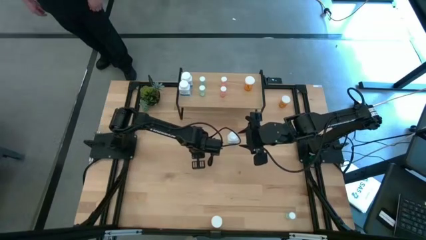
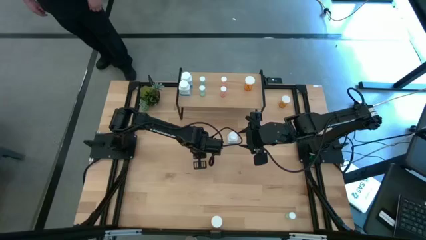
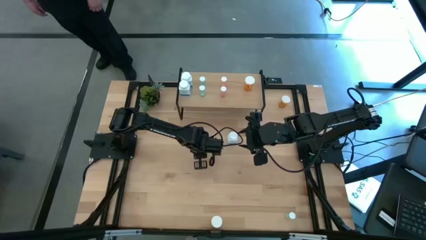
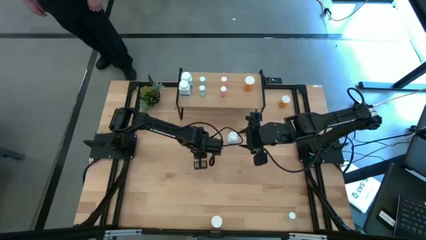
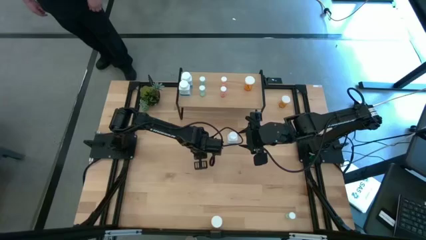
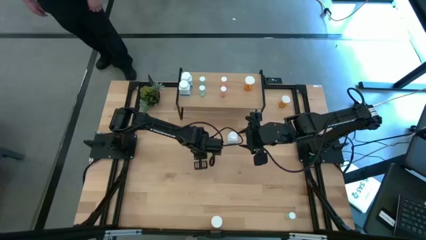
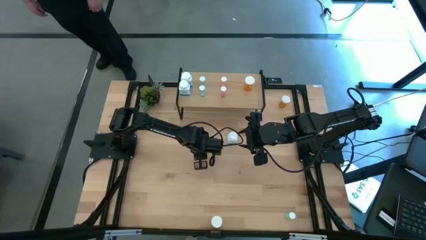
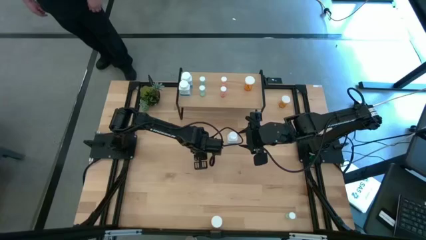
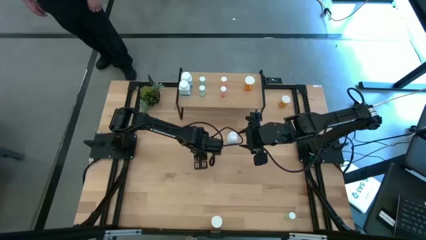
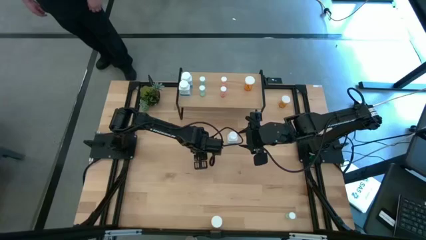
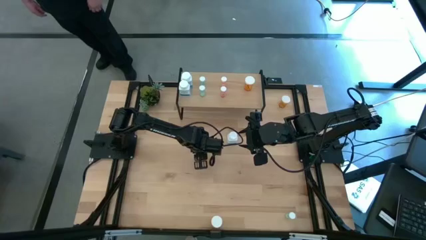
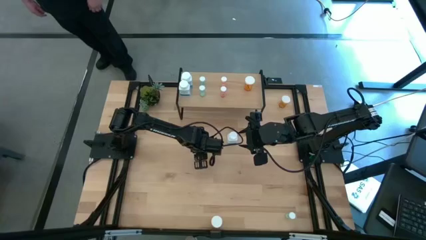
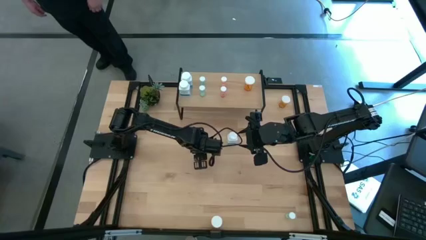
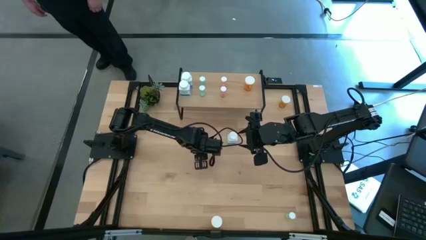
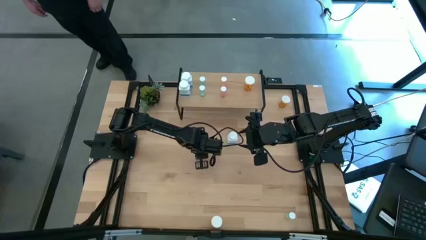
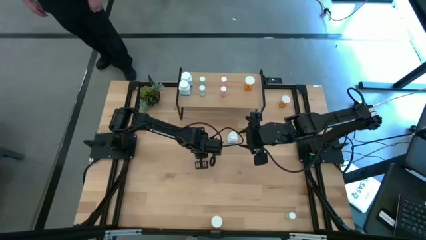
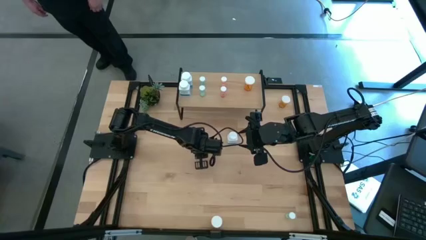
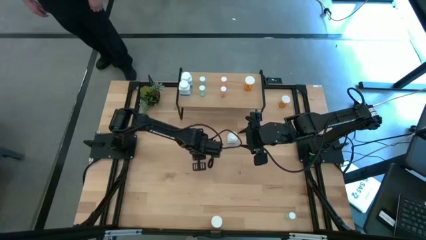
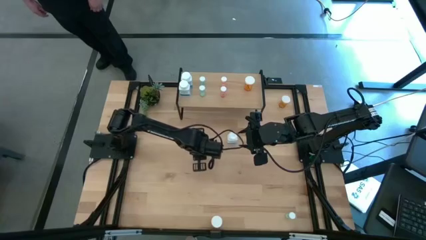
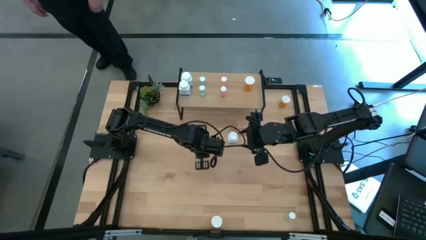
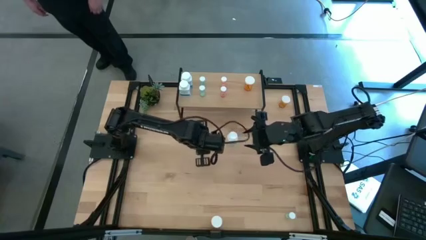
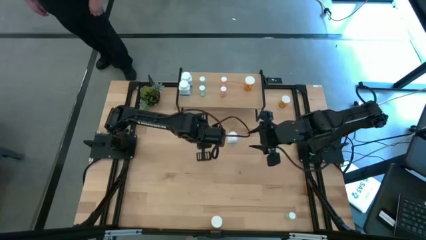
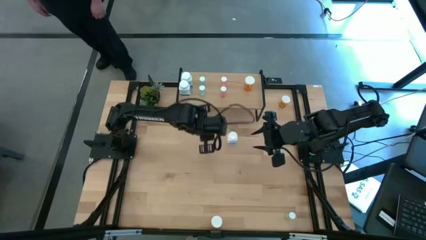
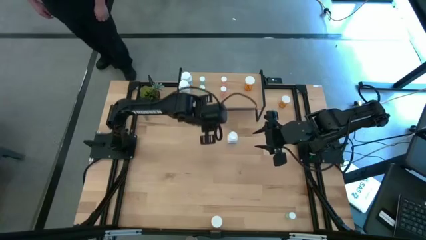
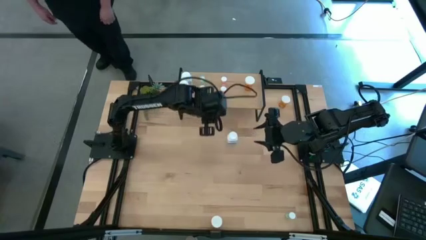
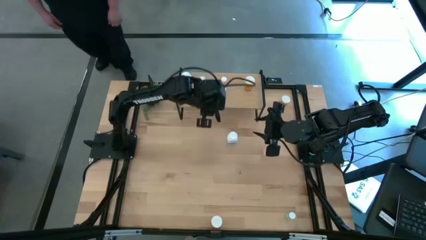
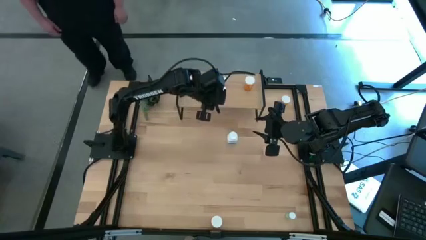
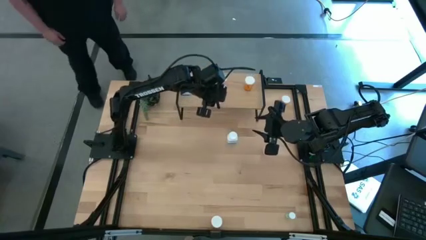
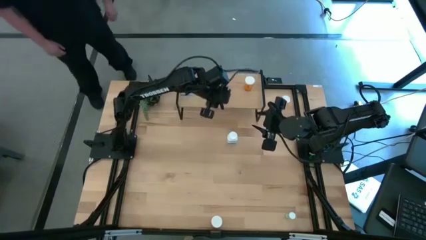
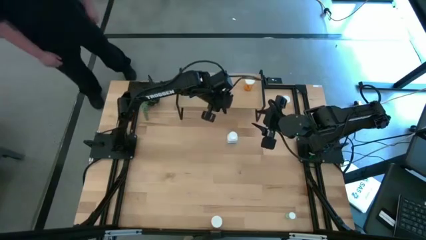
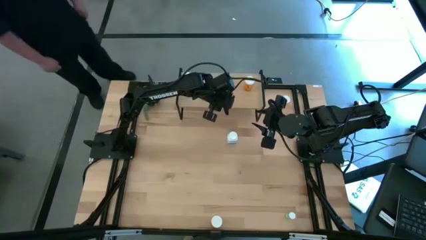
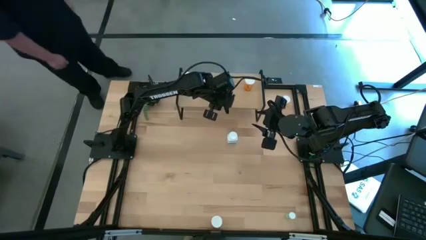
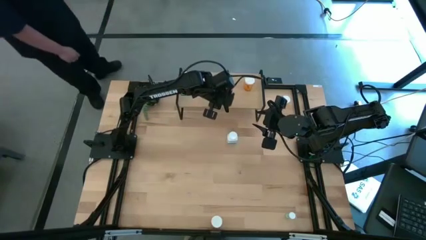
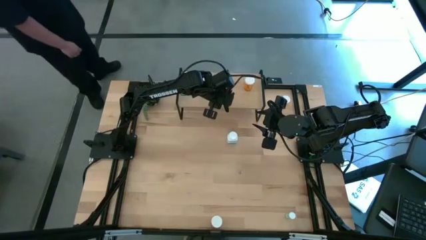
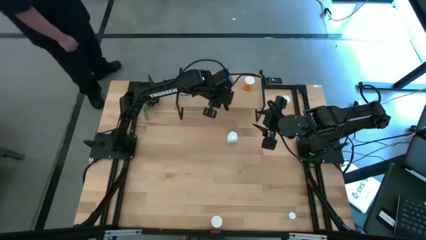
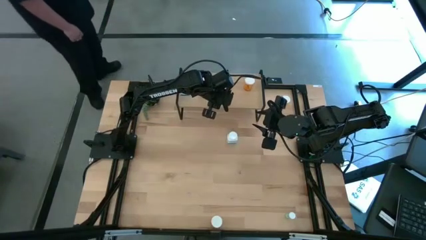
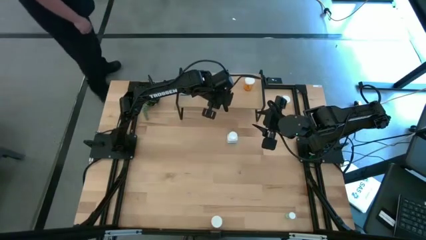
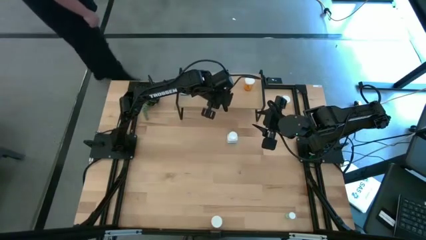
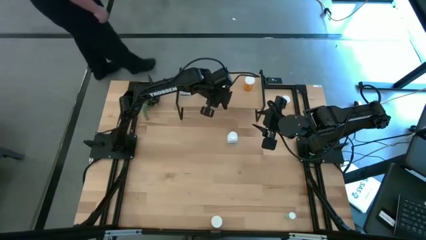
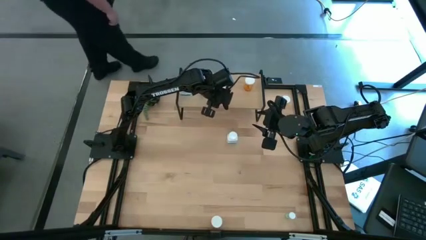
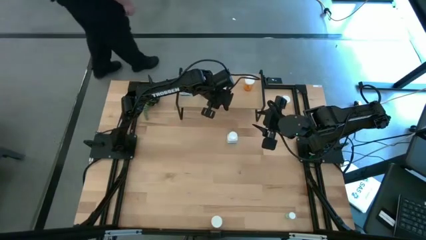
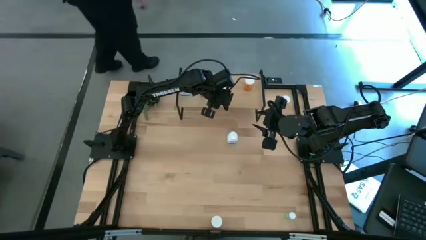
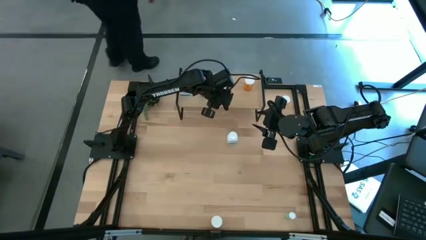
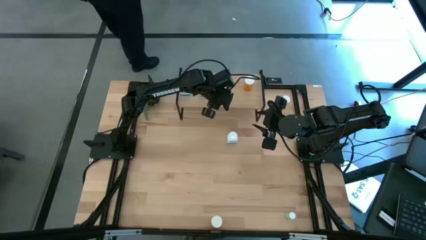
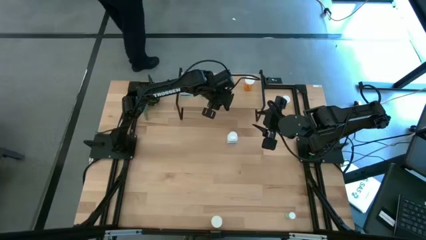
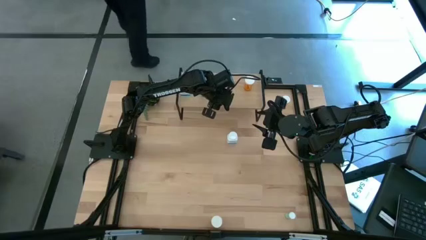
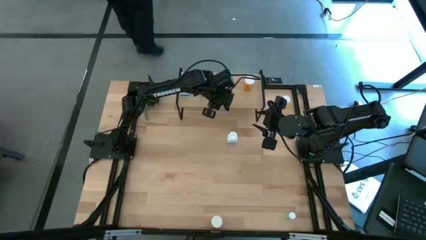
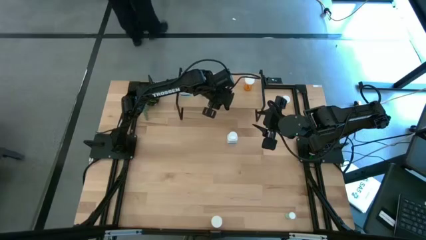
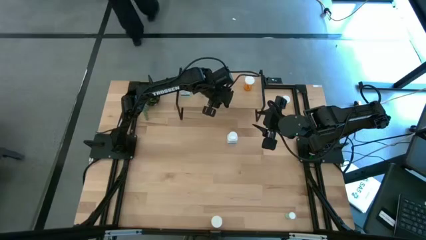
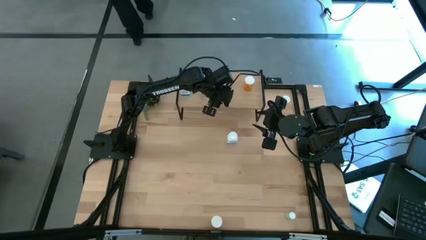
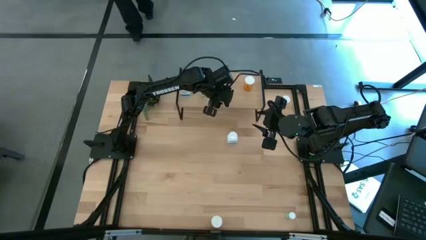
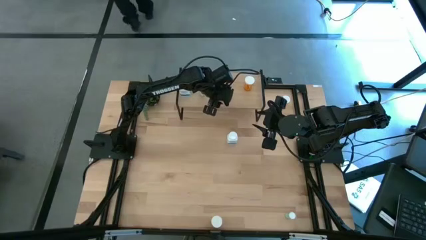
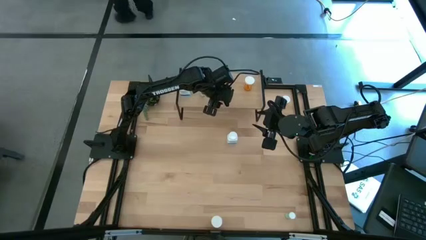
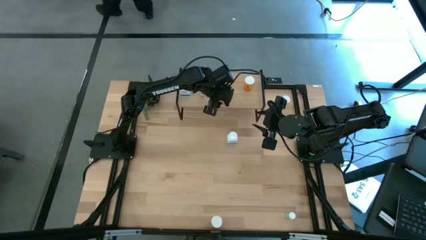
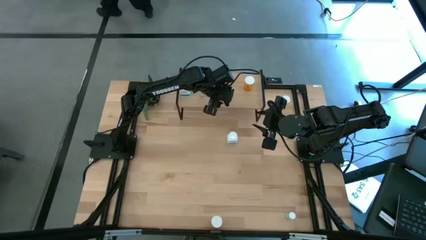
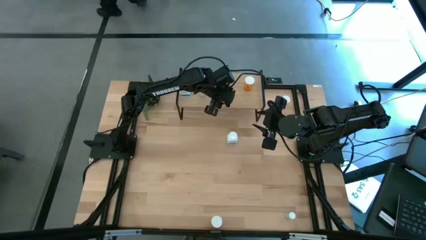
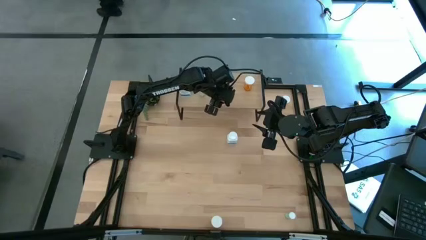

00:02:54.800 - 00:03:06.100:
Task: Pick and place medicine bottles onto shelf by color
Put the pink pill bottle on the shelf aligned with the other pink pill bottles

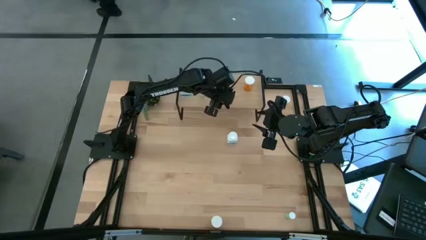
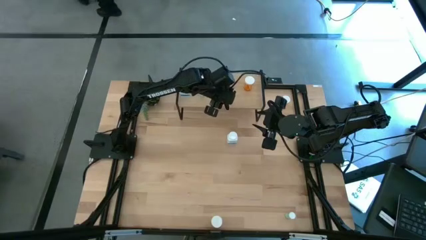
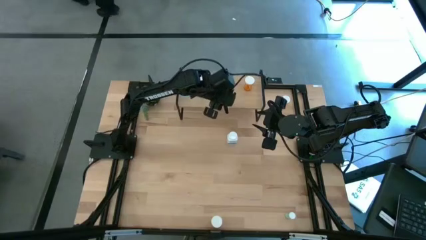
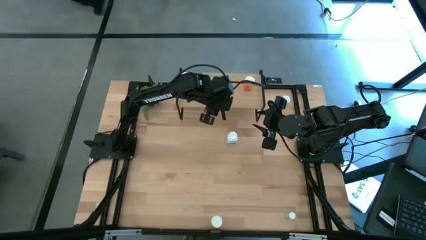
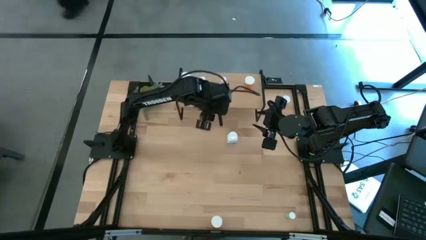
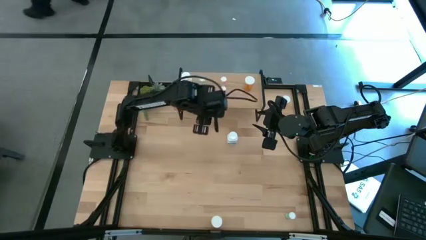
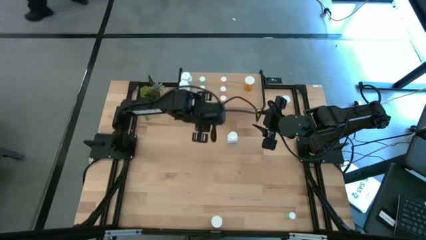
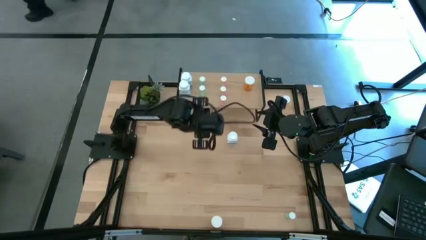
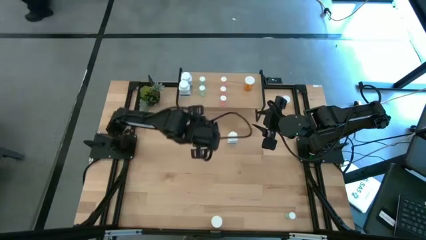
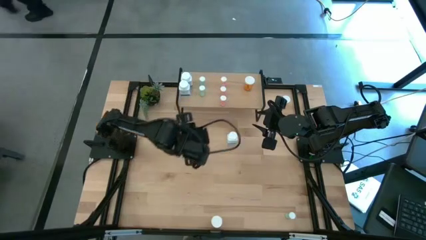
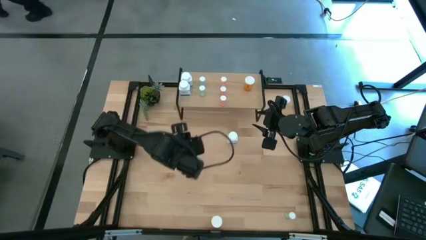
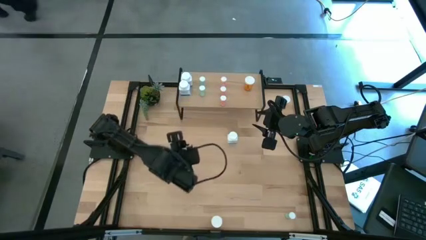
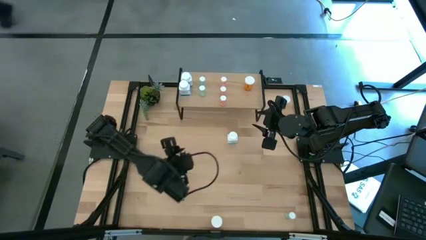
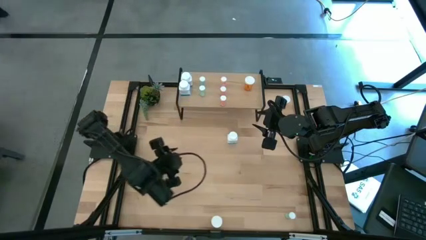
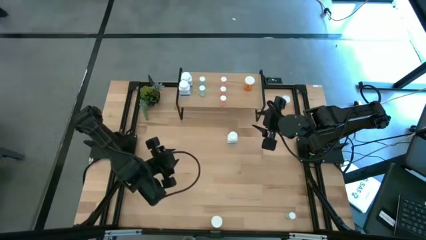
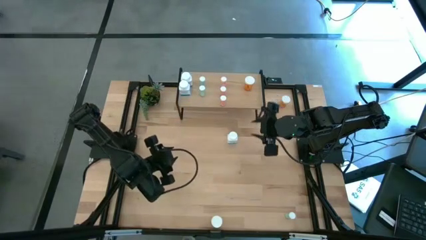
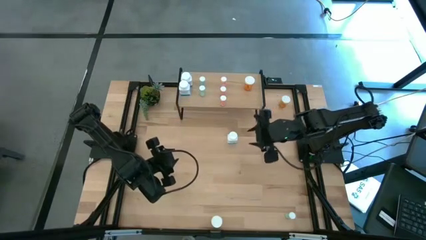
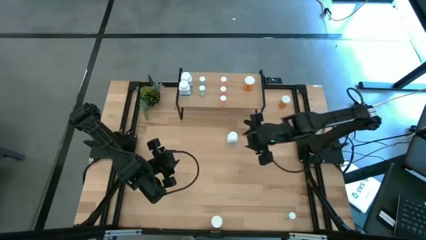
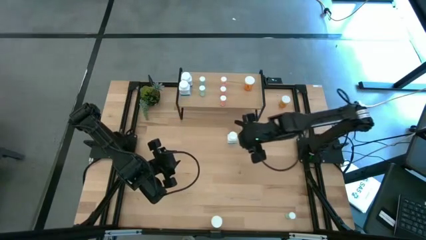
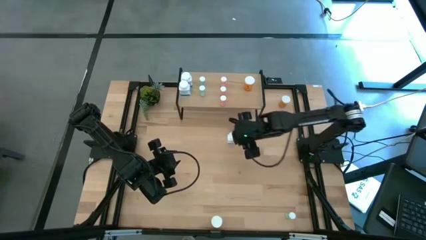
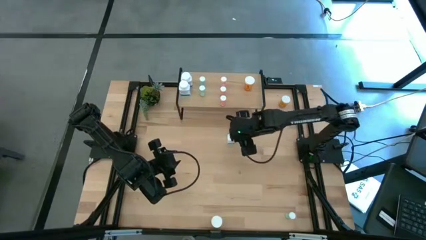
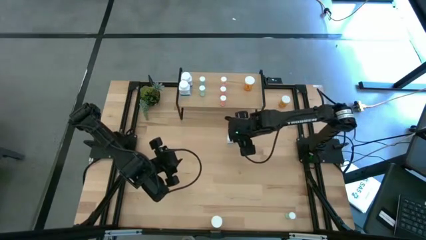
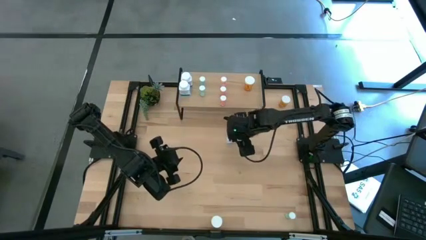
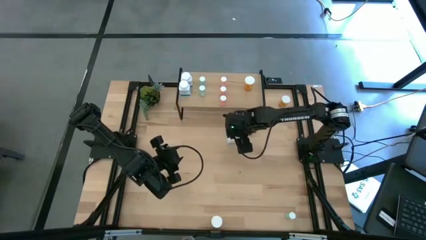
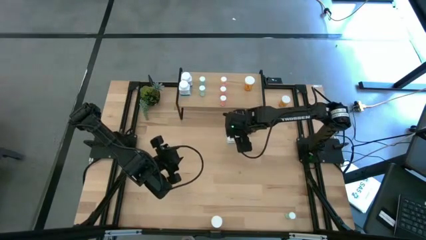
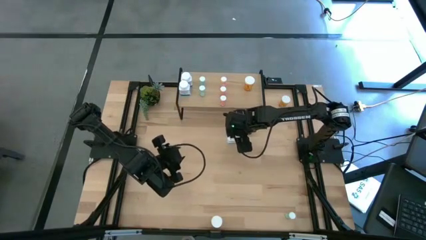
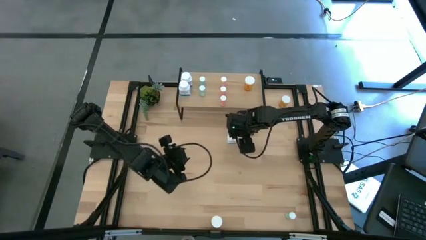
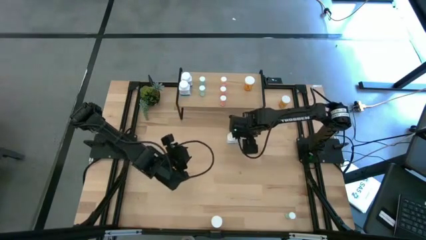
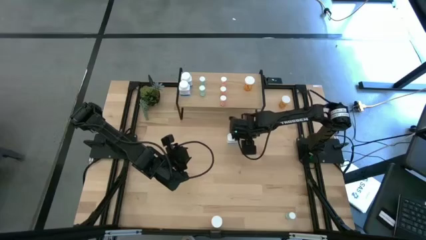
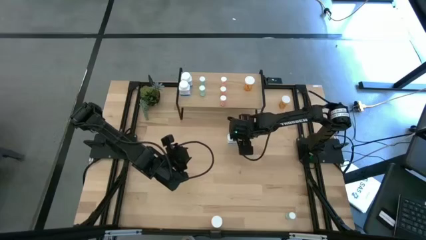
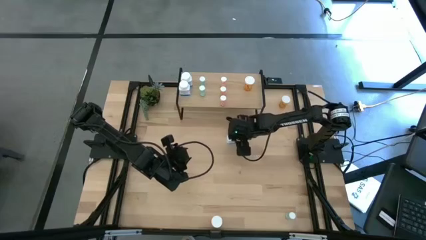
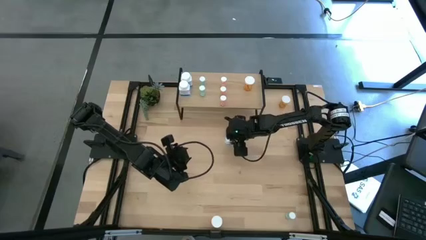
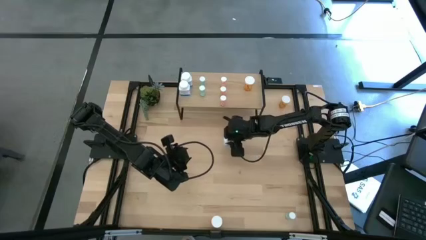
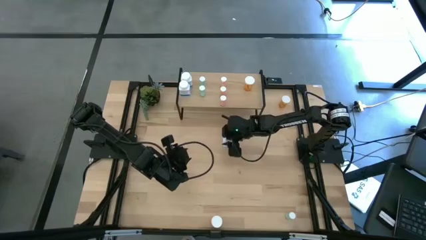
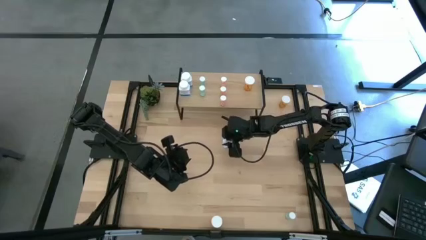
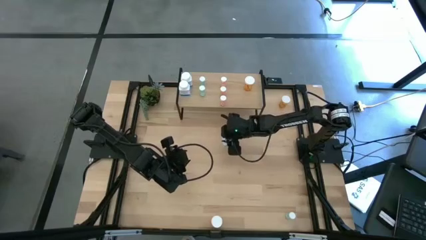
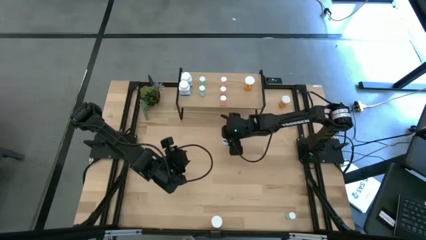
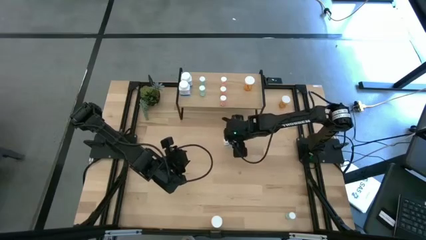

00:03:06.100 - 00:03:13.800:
Put the white pill bottle on the shelf aligned with the other white pill bottles
